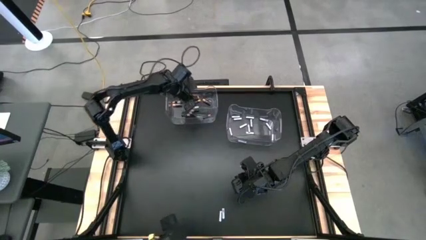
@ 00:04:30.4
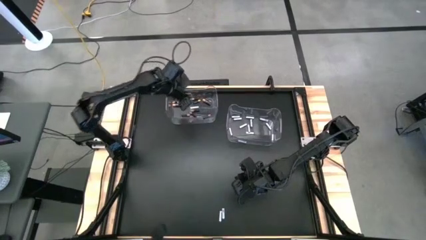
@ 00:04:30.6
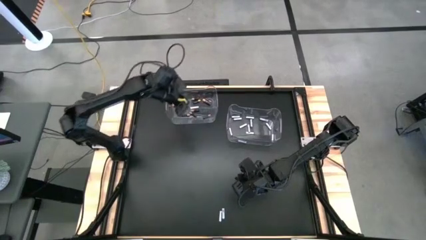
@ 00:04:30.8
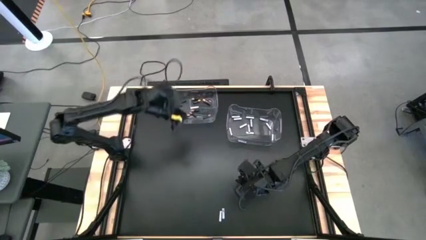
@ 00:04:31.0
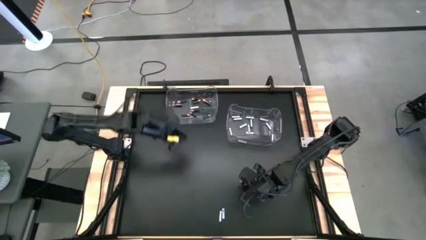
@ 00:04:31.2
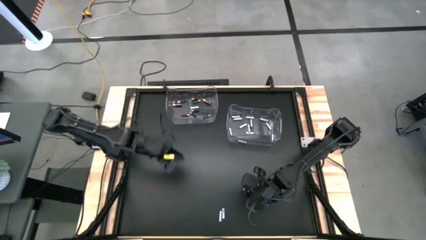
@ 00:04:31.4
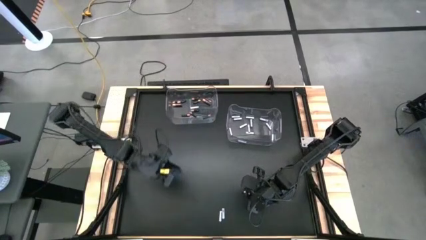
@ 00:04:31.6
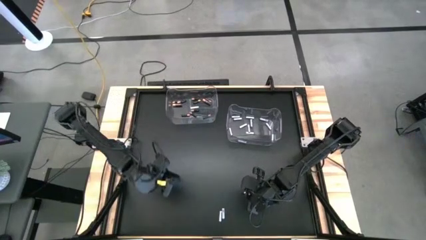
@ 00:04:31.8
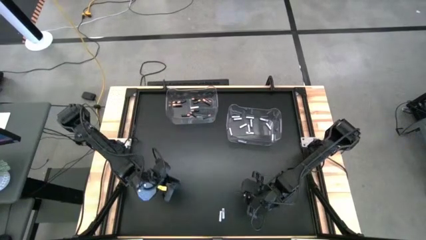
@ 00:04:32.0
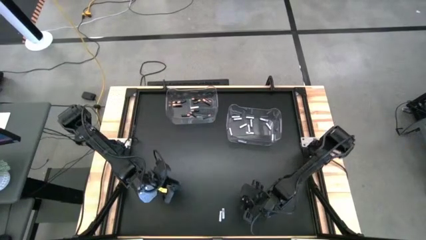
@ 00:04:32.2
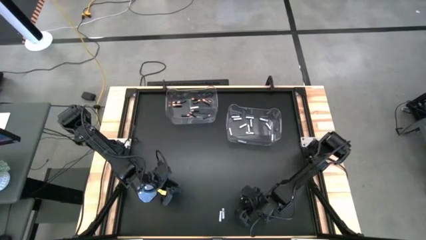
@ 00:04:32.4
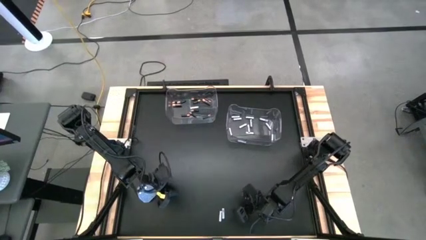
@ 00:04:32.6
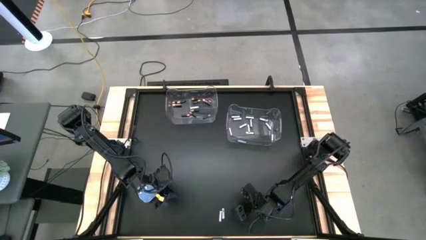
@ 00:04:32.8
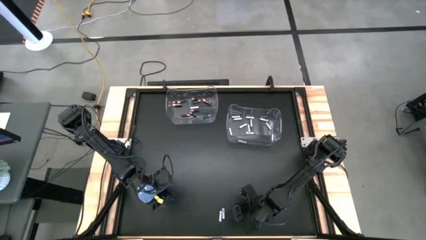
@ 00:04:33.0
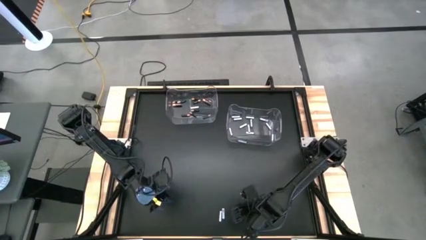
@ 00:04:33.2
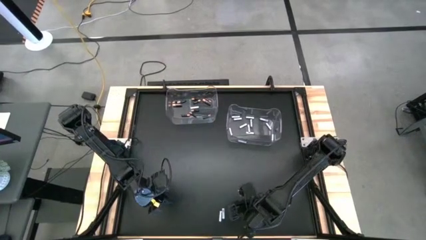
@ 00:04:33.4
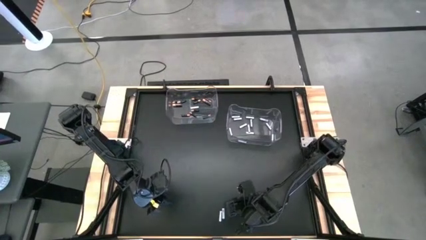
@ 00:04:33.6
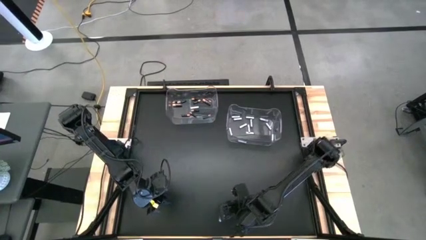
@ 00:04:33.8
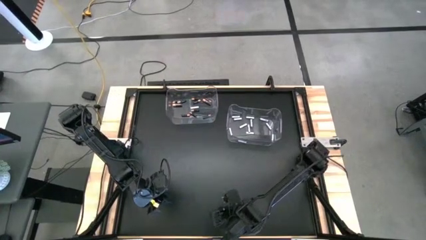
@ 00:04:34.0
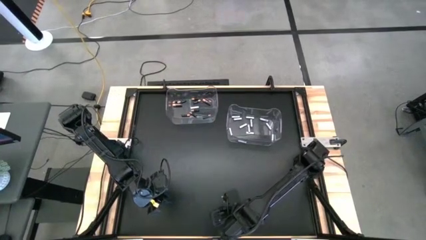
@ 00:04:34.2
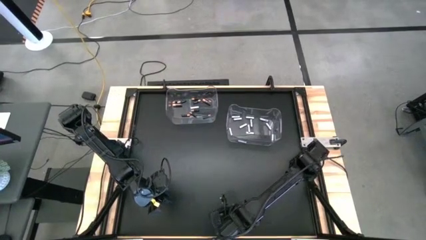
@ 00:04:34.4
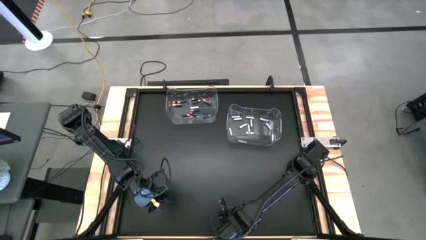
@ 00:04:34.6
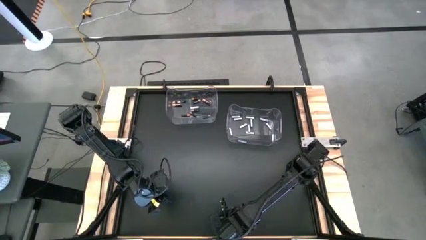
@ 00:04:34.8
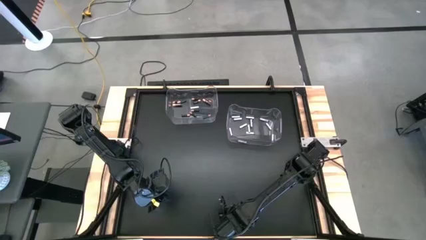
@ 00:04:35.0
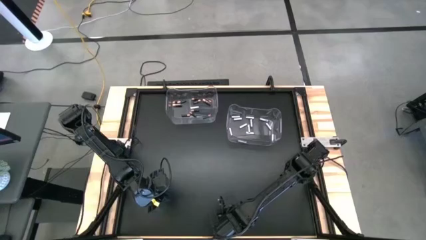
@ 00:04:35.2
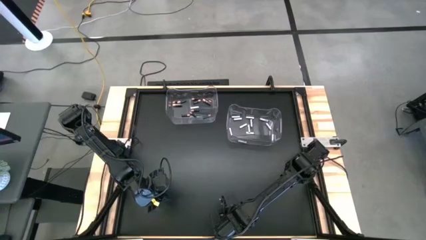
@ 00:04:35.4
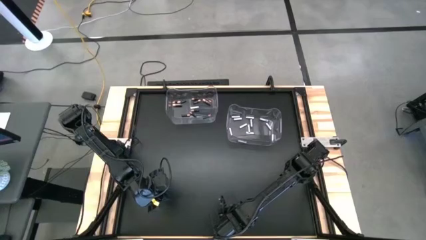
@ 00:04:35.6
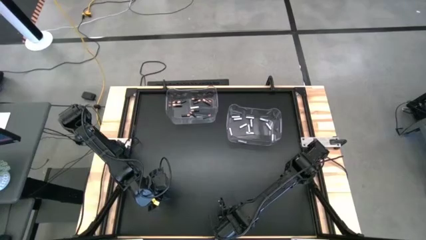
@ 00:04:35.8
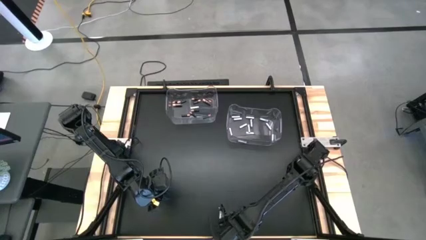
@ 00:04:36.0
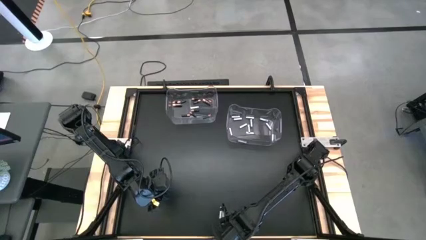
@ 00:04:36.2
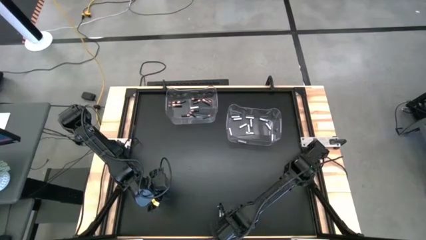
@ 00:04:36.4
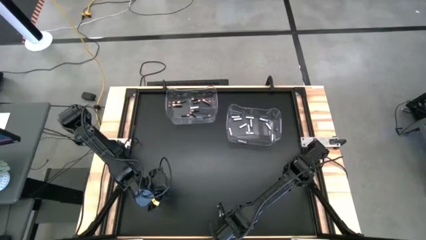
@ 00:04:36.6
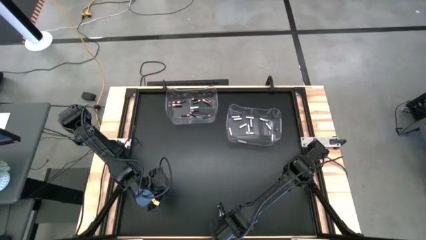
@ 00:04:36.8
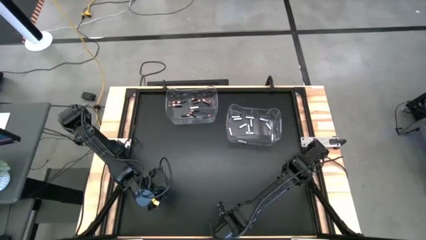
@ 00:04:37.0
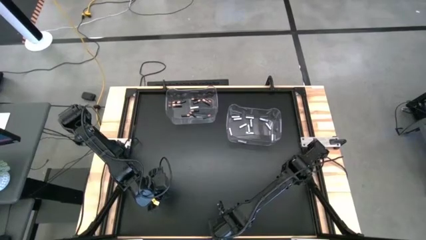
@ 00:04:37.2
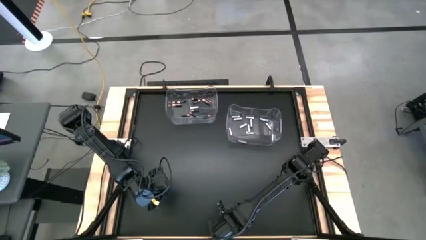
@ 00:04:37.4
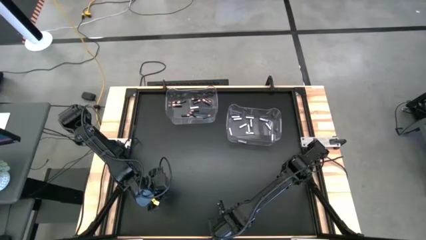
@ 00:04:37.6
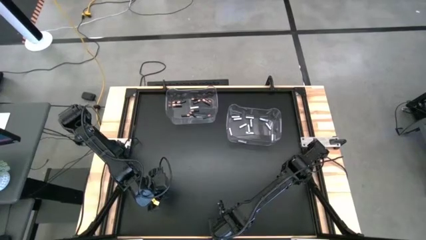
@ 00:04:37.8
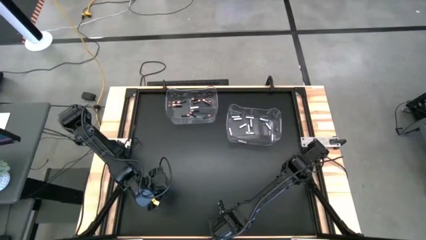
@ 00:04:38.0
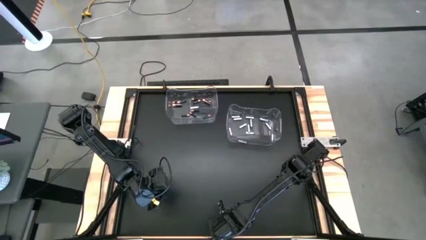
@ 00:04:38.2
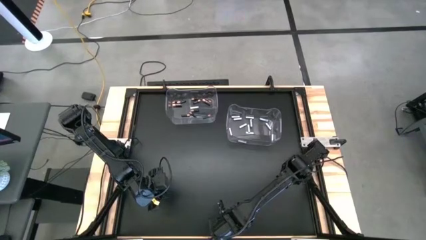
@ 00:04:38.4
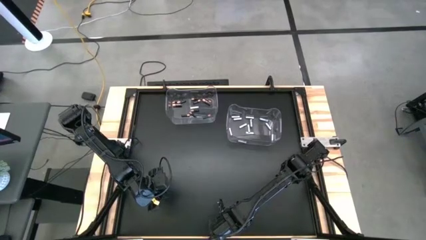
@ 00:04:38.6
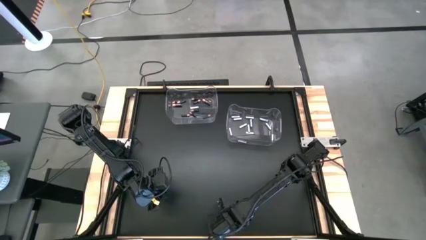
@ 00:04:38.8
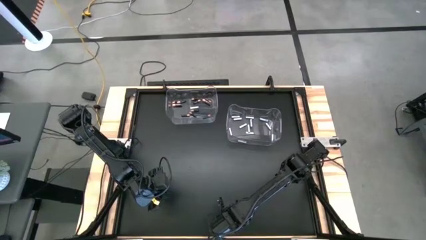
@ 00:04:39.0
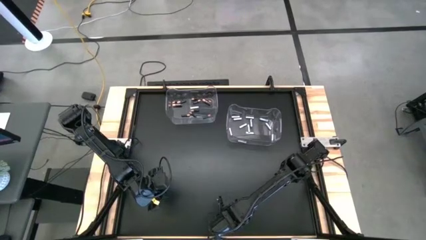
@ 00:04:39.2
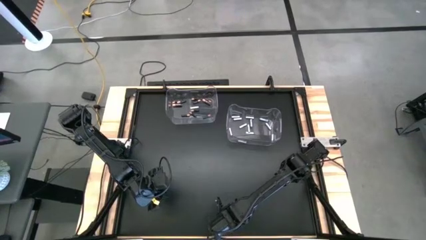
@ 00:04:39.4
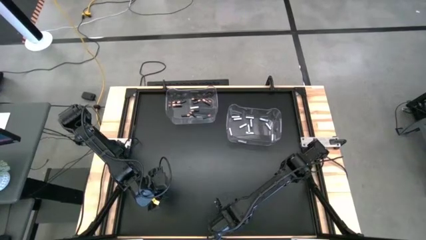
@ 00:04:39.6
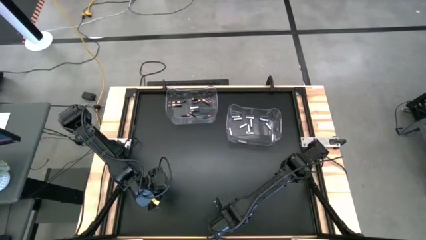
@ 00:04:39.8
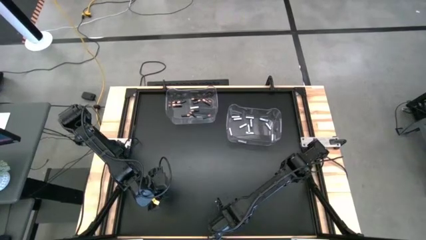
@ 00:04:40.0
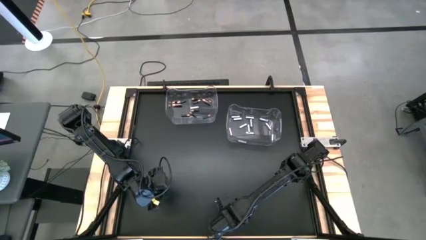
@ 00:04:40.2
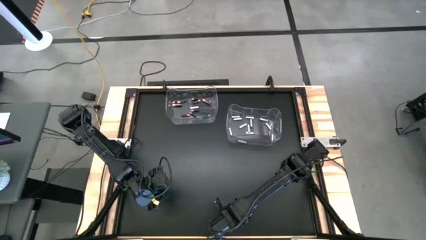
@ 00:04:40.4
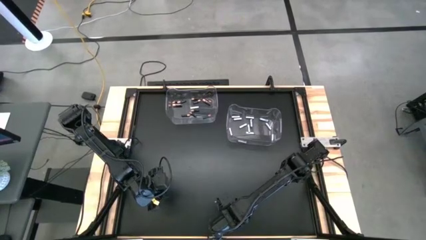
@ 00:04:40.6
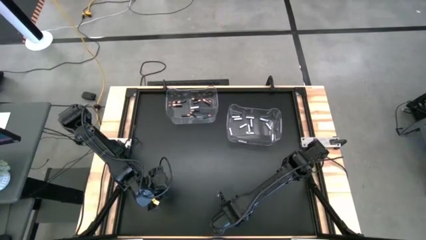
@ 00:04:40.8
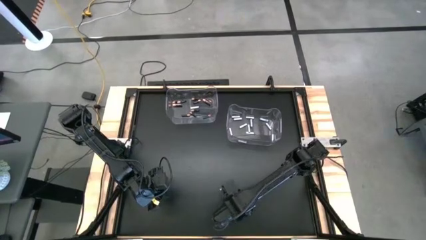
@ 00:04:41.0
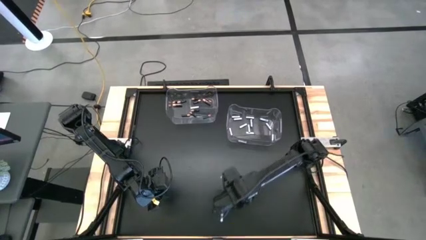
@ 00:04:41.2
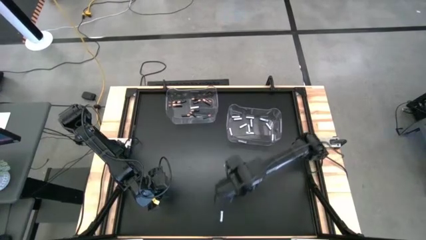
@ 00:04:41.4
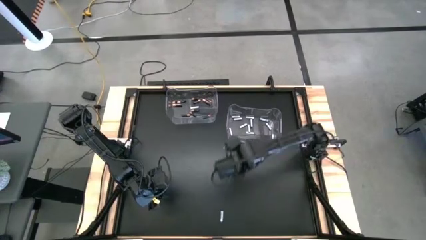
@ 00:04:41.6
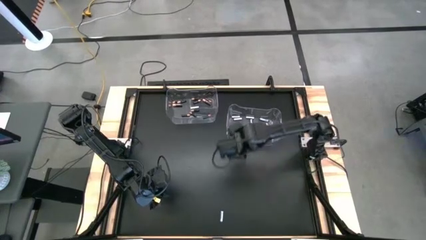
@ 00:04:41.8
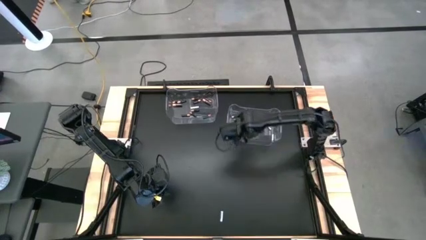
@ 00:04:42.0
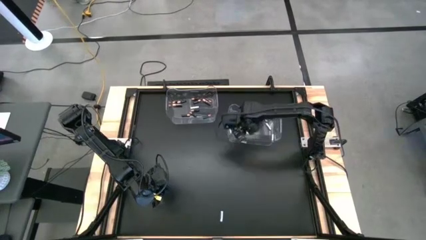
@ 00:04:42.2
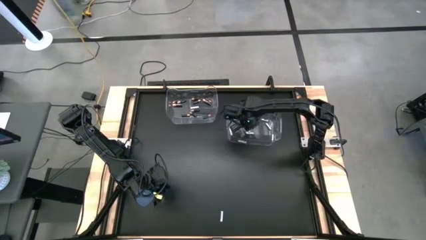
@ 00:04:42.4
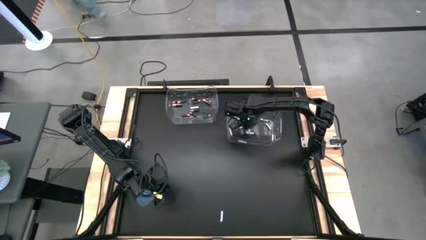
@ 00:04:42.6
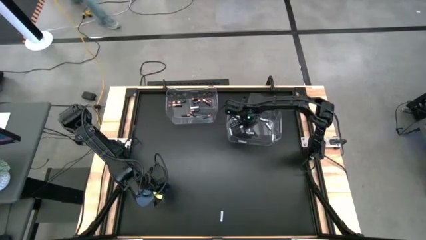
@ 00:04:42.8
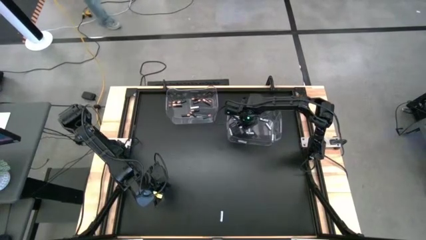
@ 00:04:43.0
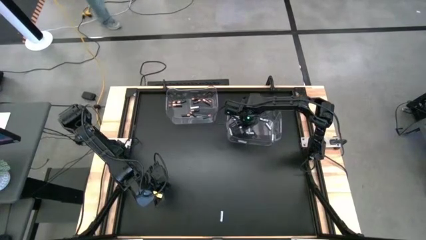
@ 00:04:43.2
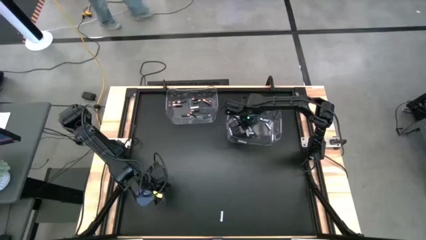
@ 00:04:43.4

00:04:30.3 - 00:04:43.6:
Task: Sort batteries
Put the white battery into the right transparent bin

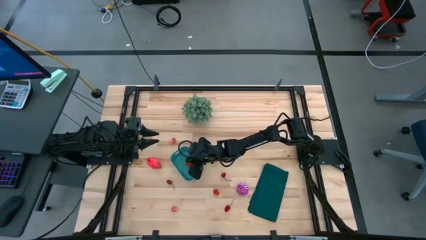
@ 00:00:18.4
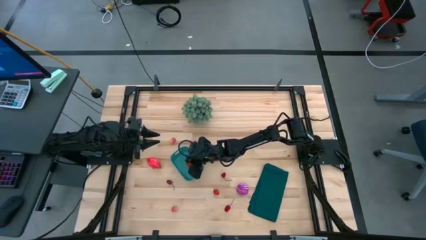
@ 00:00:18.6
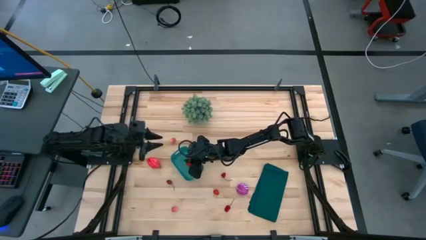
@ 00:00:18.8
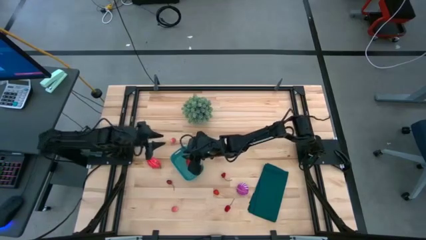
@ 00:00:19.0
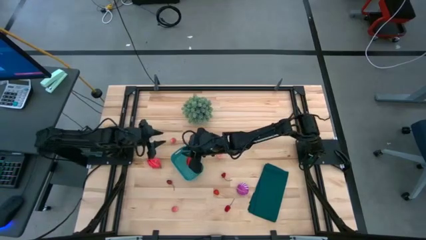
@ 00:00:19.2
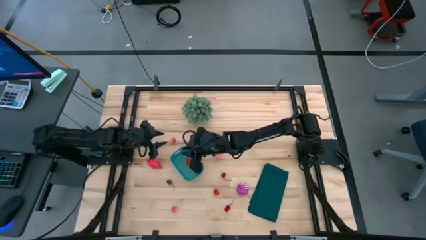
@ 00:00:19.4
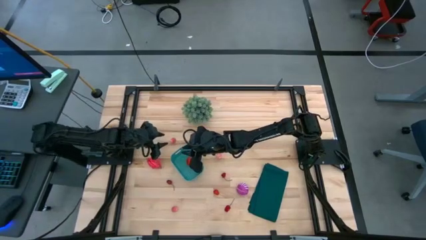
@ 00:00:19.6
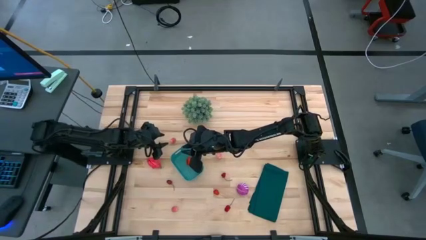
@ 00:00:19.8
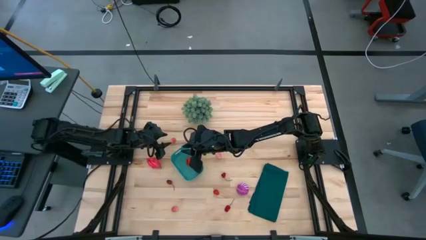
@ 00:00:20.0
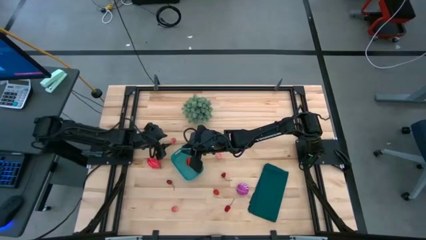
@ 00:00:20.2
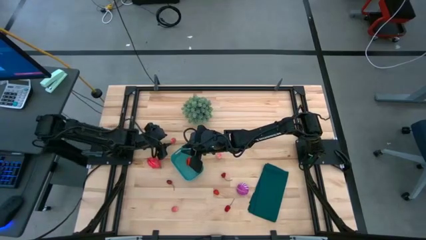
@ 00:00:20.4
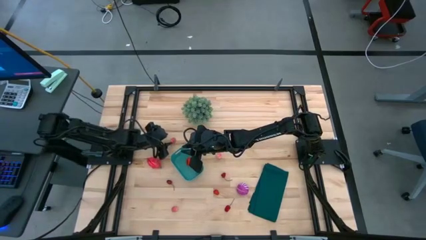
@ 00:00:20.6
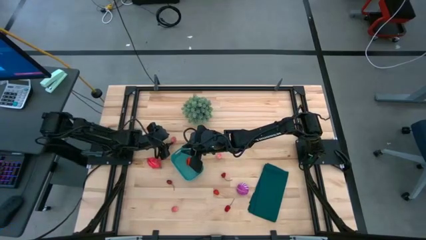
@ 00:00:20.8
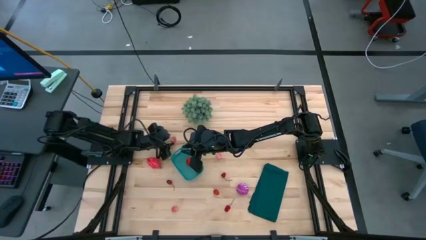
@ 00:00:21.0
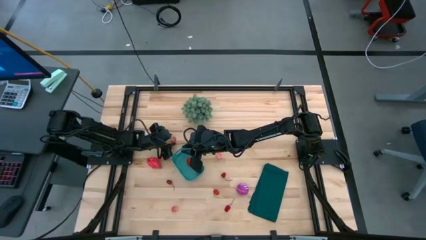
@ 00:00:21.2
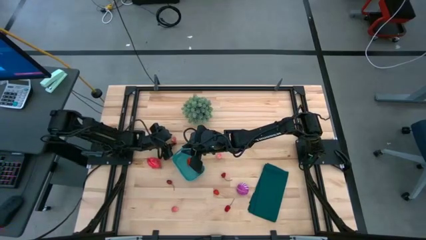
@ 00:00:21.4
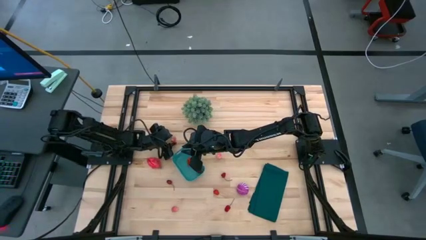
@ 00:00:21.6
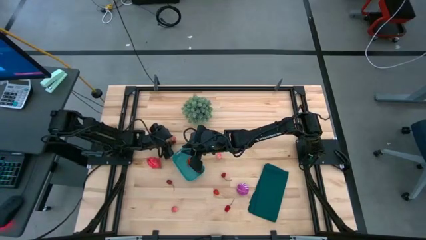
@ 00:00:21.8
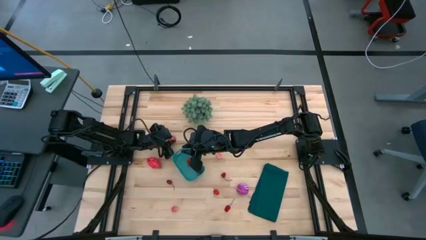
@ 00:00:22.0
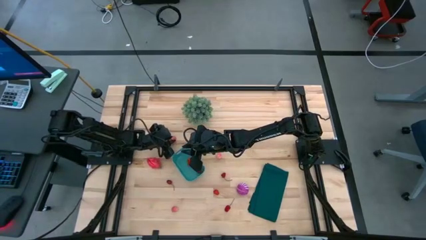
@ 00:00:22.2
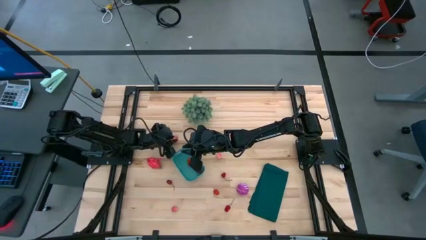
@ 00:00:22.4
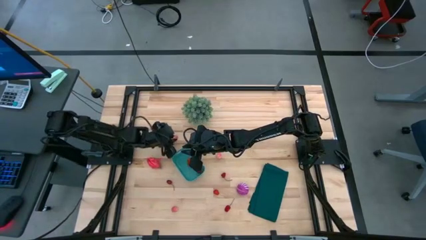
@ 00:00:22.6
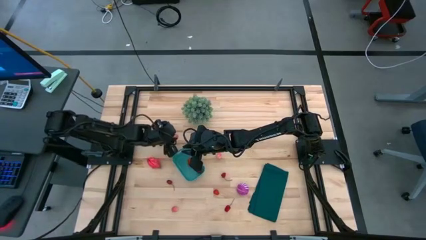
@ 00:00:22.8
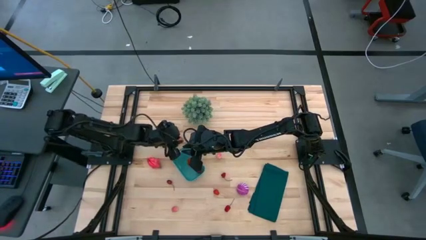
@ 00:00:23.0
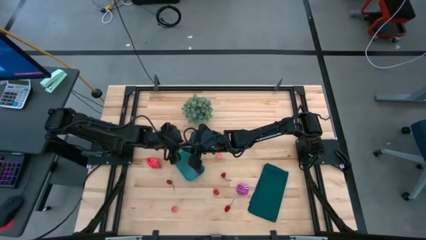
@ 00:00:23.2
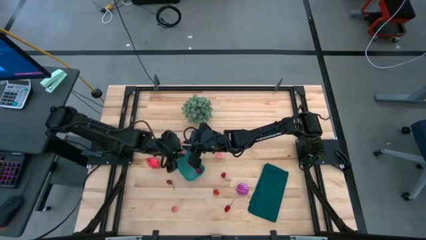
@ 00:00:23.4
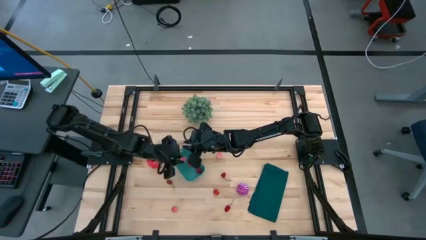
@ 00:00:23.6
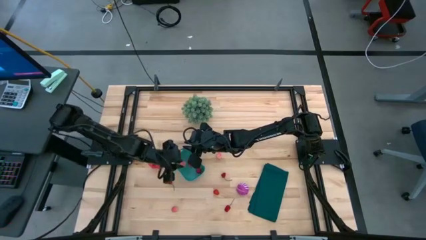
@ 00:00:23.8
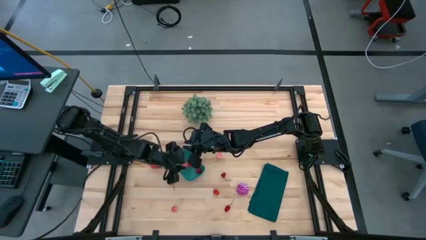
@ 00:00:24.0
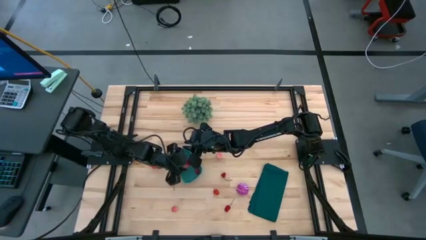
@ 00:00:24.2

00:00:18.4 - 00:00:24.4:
Task: Pick and placing Produce into tupperware
Put the pink peach into the green bin
